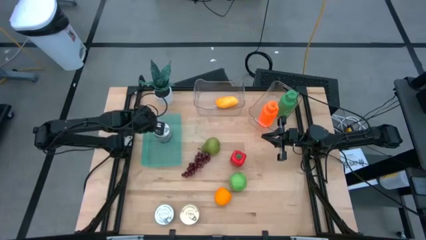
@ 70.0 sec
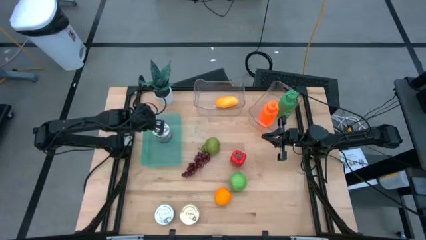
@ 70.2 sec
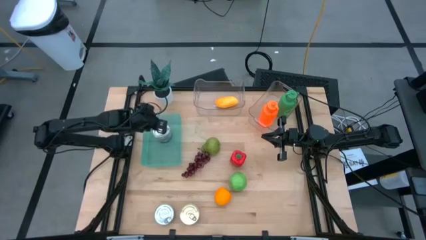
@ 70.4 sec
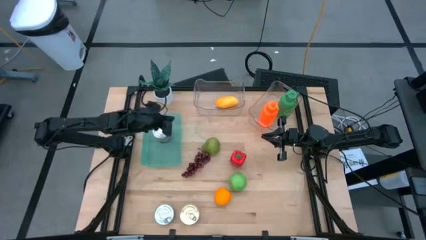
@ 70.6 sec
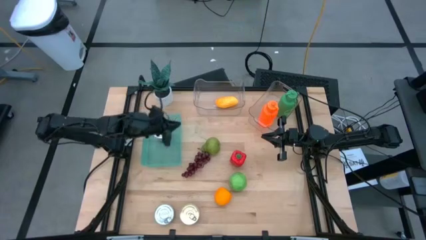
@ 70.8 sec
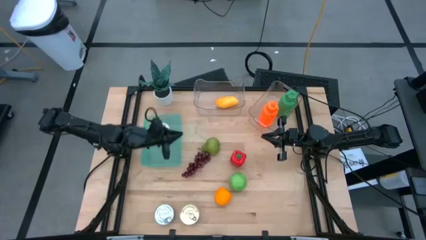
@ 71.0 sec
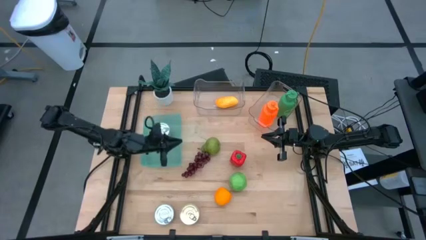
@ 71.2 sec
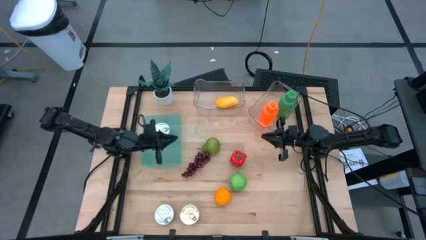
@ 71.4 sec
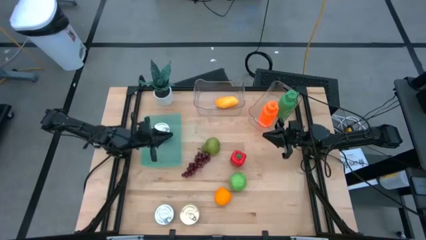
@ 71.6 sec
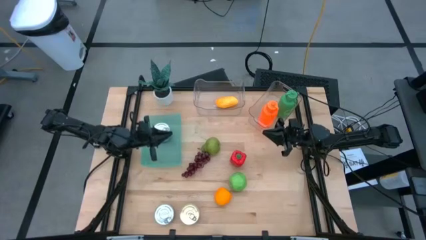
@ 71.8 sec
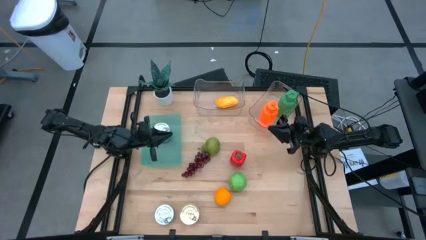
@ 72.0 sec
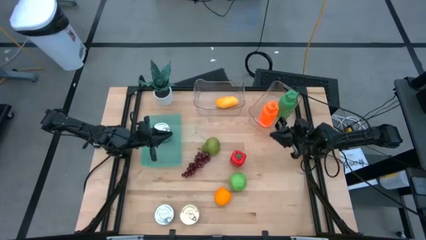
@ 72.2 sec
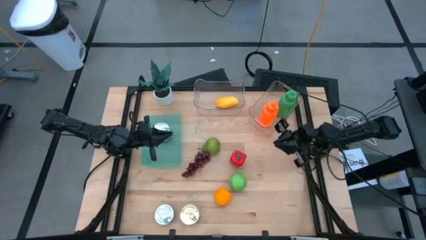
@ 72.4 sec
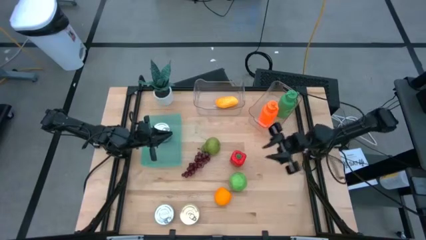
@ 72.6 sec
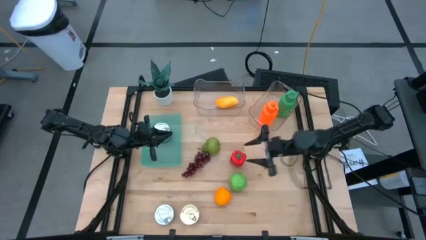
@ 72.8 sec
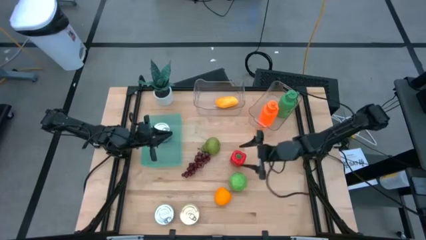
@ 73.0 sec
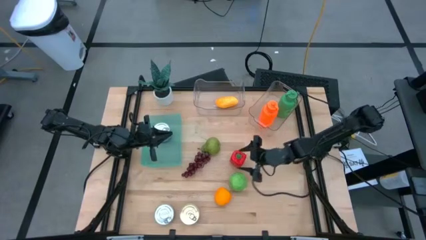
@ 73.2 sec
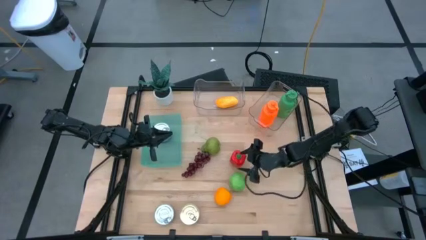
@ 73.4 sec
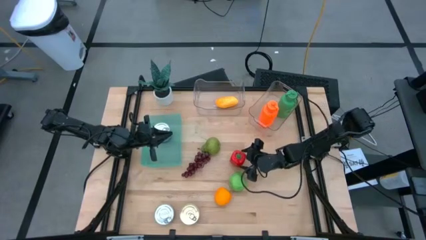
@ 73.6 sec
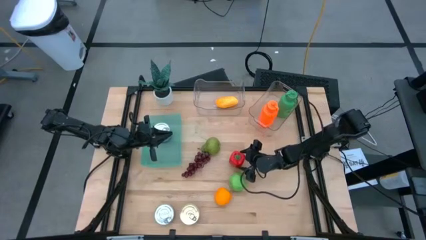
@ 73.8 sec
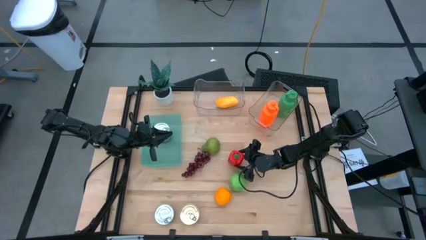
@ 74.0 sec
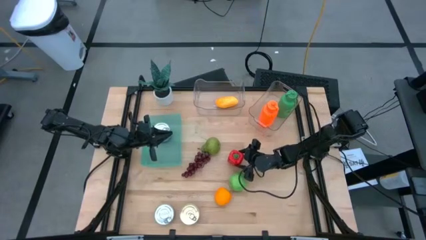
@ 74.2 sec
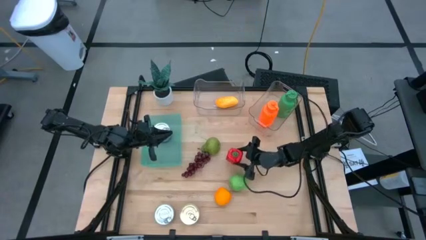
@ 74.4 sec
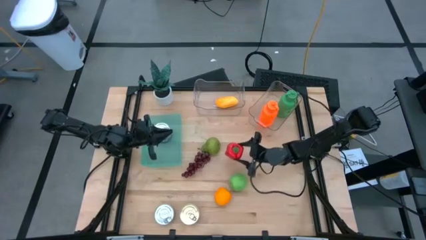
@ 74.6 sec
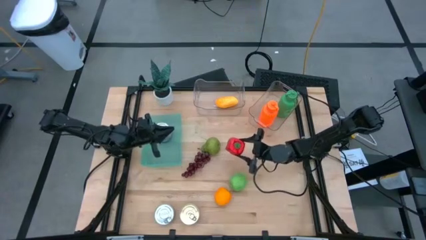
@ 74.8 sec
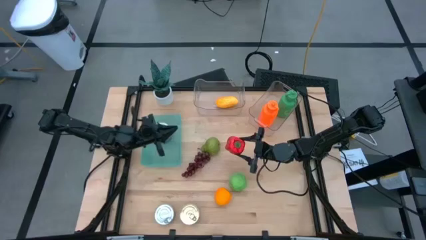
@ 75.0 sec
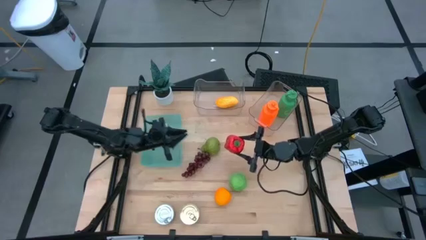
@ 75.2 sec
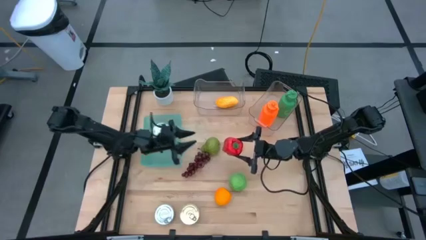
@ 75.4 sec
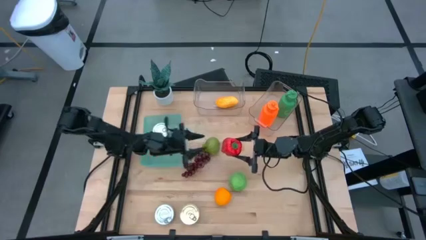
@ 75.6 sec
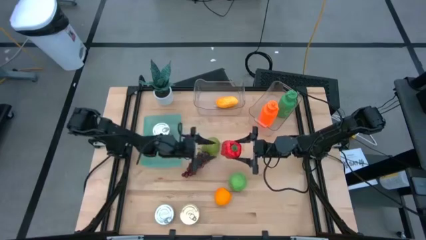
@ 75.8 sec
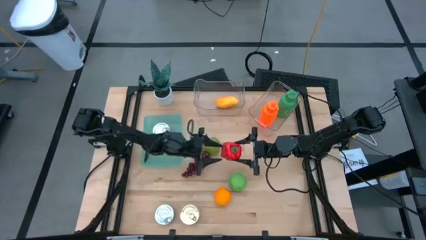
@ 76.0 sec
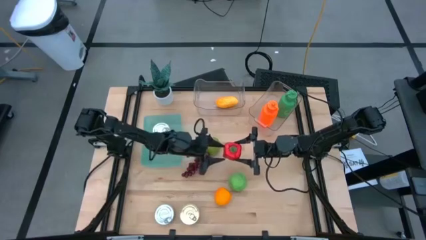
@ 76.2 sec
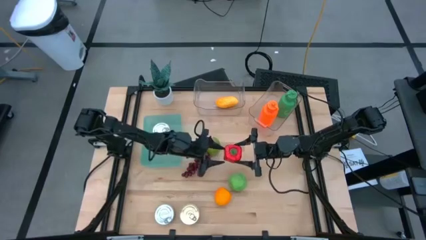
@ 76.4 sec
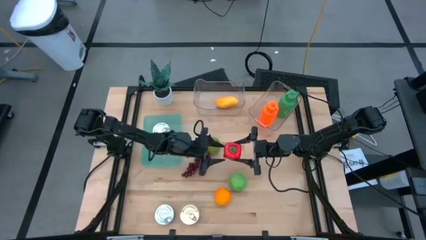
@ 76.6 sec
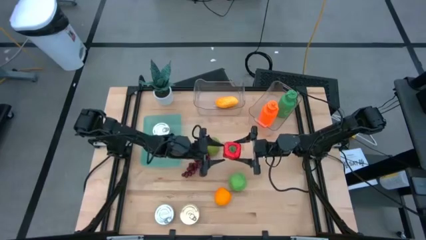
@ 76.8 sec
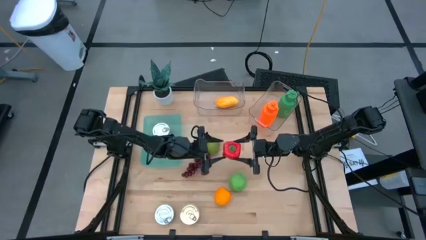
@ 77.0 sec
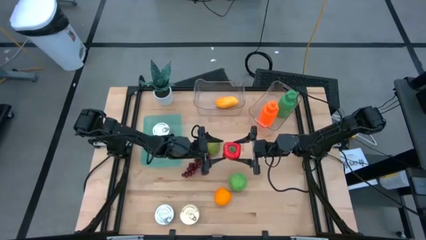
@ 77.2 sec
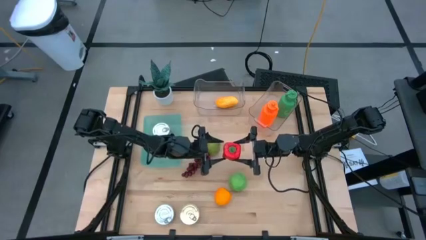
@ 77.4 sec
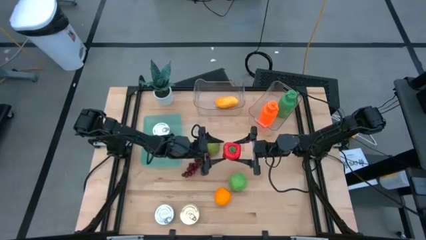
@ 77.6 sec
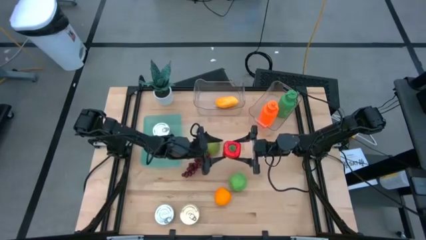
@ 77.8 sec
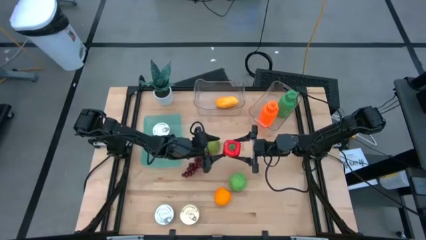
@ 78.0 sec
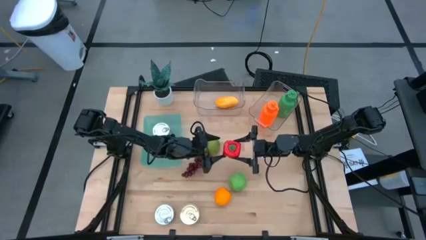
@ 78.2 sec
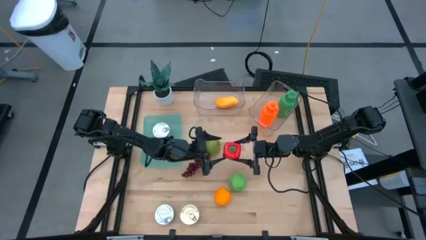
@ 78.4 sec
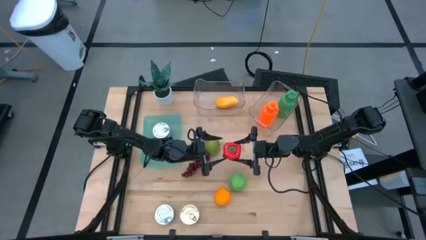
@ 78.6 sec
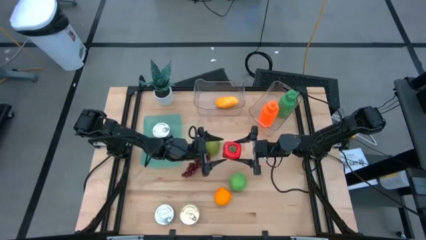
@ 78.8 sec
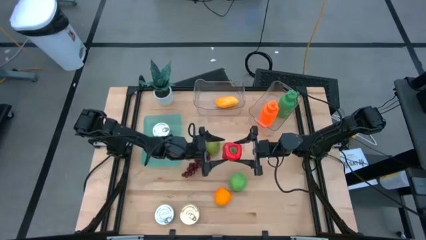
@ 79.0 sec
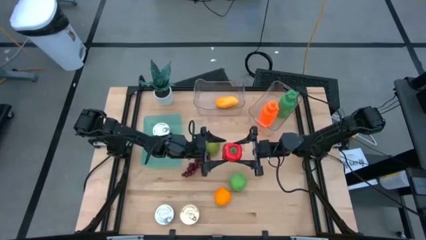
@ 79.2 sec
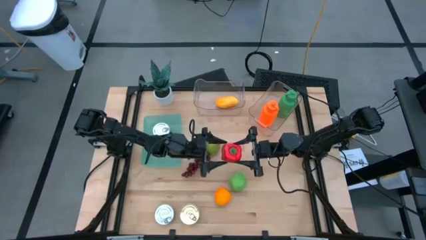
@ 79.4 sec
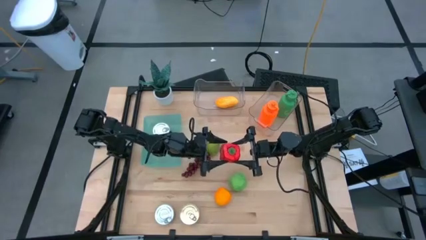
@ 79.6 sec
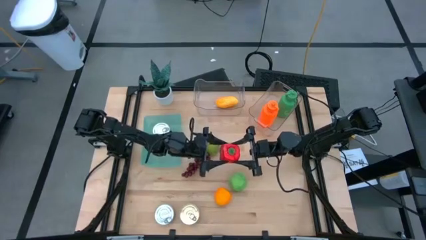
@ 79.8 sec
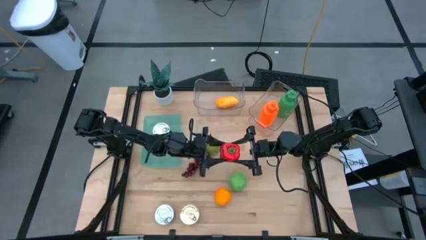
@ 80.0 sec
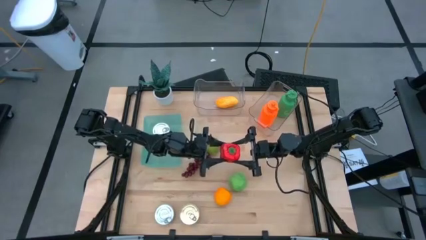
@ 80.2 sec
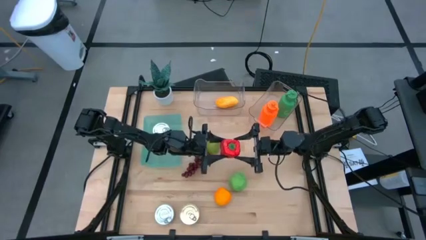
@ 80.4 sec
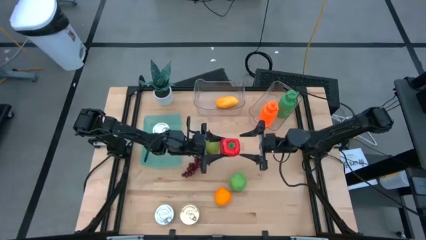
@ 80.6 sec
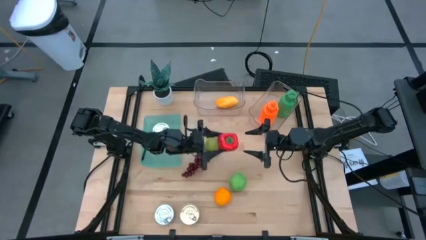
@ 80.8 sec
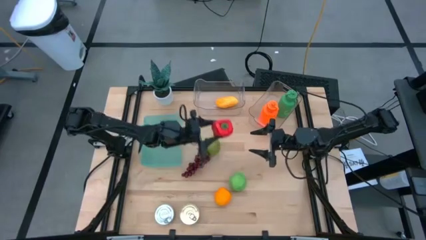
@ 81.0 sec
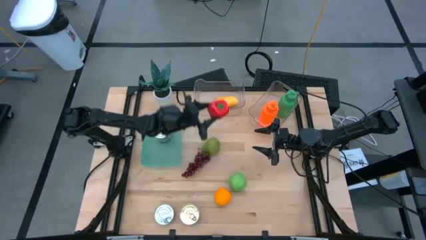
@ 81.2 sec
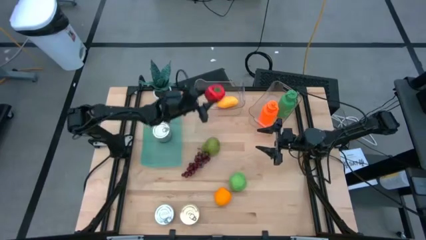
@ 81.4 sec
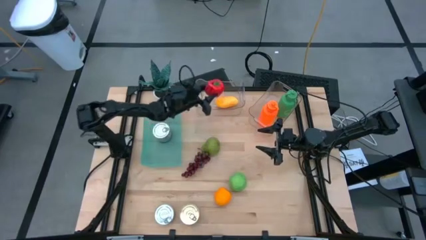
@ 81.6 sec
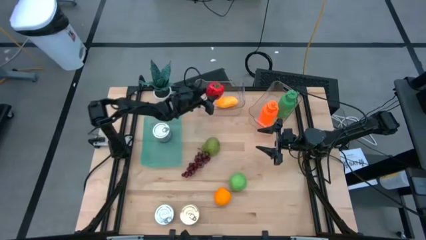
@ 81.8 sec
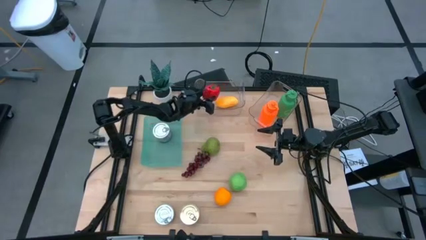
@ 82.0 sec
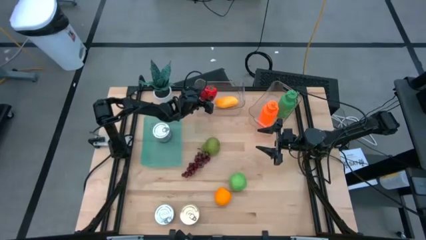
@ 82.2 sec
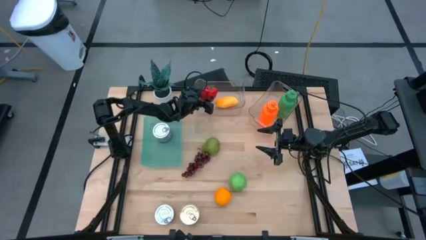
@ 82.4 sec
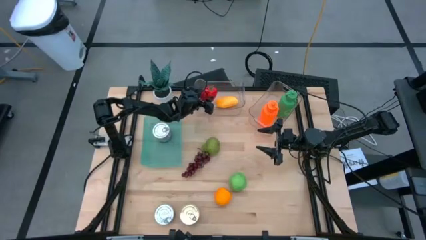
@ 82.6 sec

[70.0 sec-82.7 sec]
Task: Pick & Place Food Item
Put the red bell pepper into the left transparent bin

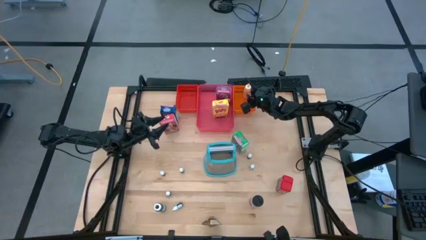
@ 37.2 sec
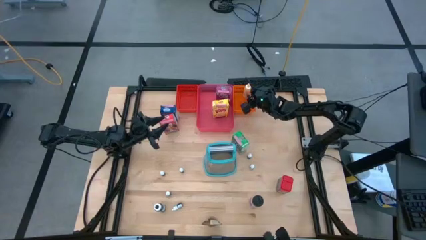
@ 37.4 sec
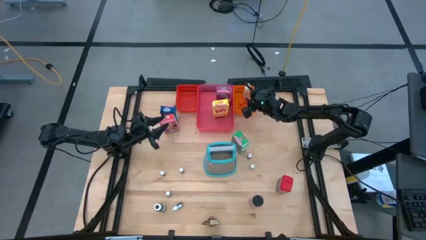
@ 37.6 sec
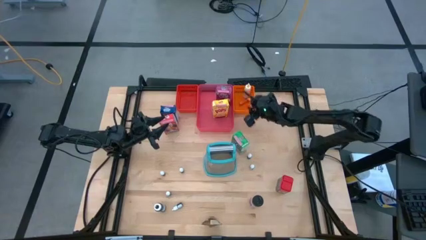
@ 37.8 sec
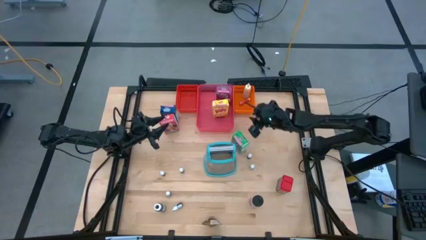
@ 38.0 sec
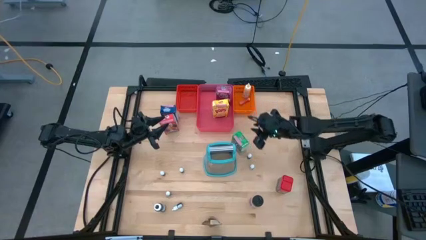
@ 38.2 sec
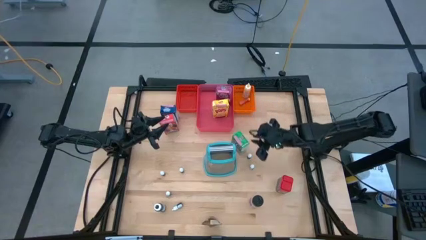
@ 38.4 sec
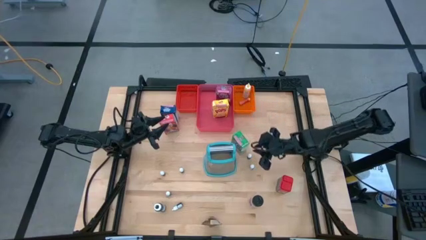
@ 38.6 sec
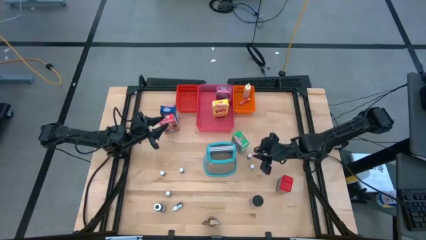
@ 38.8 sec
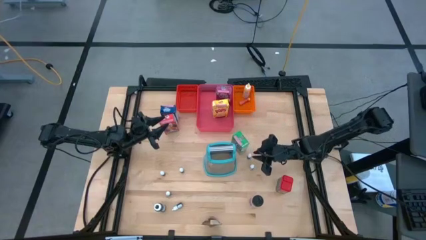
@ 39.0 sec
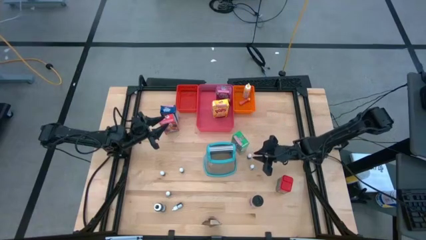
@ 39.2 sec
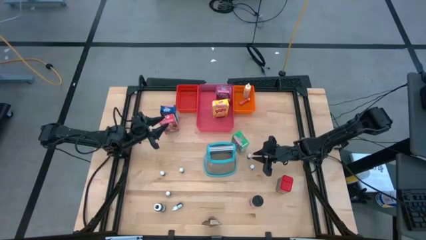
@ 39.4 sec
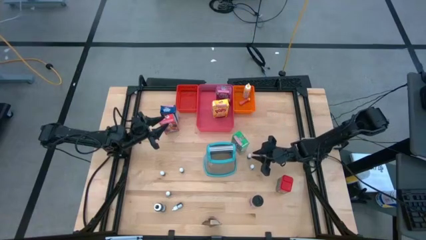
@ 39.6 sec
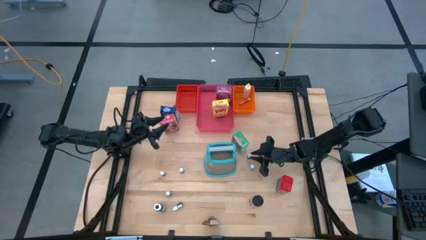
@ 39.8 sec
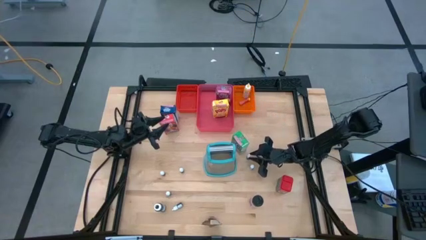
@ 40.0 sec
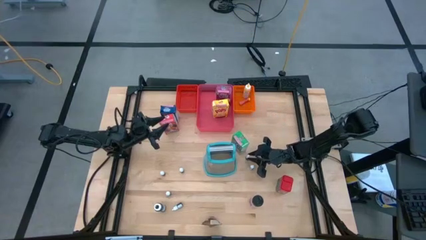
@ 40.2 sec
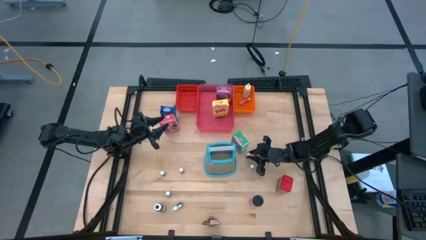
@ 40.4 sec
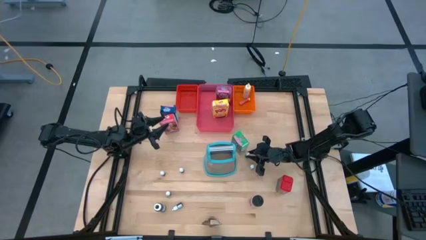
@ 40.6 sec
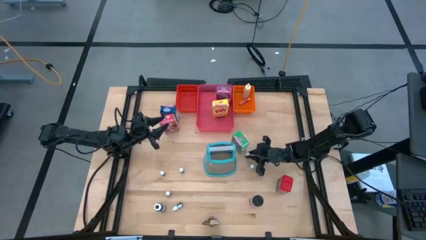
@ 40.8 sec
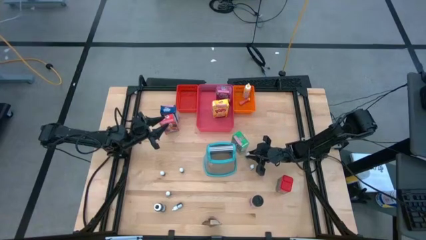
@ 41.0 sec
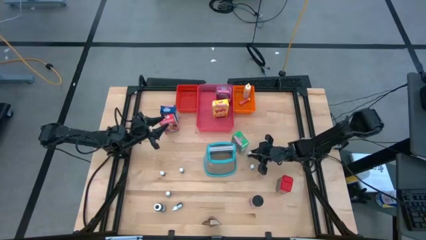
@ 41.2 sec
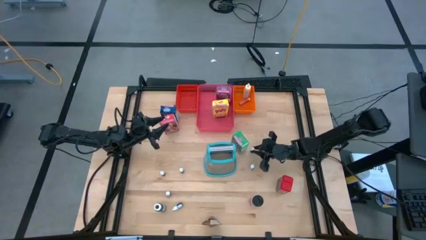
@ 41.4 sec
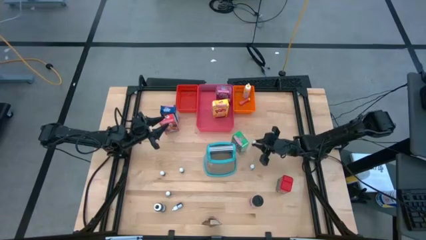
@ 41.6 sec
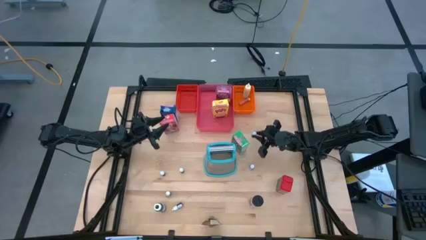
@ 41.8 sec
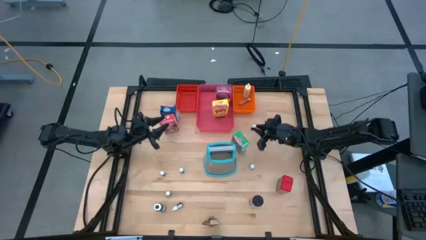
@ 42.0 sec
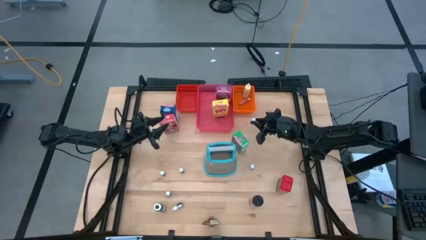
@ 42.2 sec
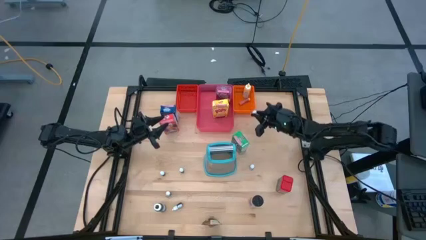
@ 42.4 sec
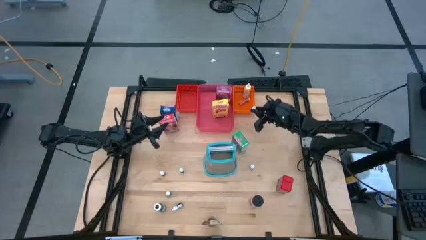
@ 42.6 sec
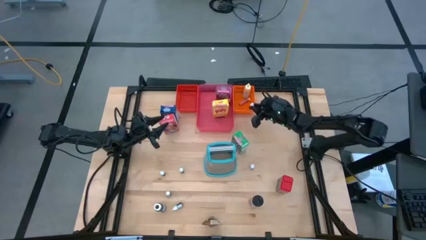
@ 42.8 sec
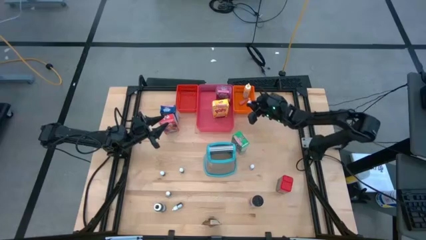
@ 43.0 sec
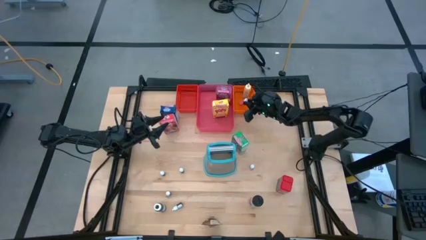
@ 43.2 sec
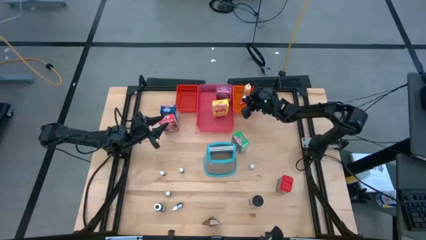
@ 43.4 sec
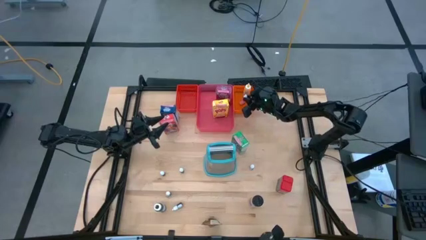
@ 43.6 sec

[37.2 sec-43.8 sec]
Task: Pick & Place Kitchen Items
Put the small red food coloring bottle into the orange bin
